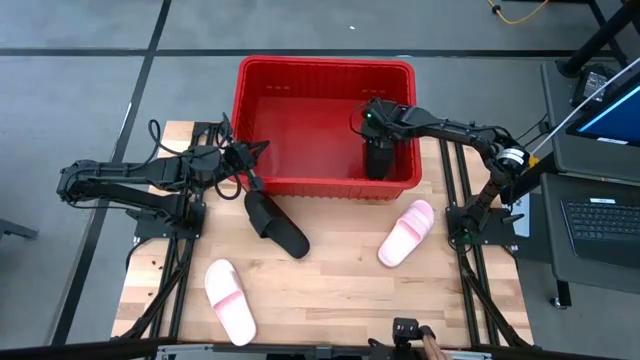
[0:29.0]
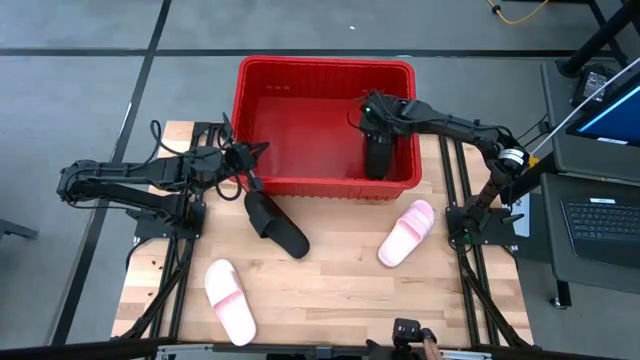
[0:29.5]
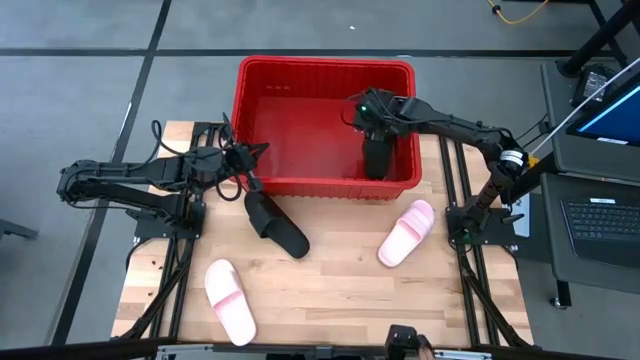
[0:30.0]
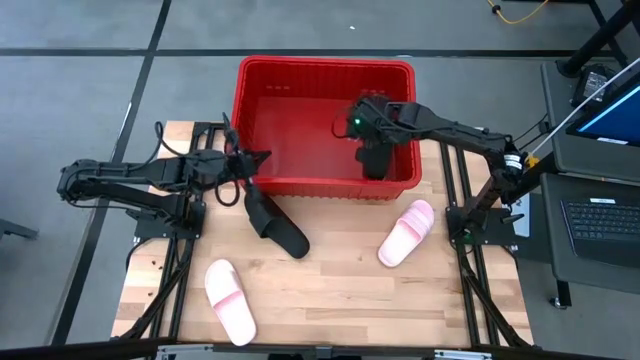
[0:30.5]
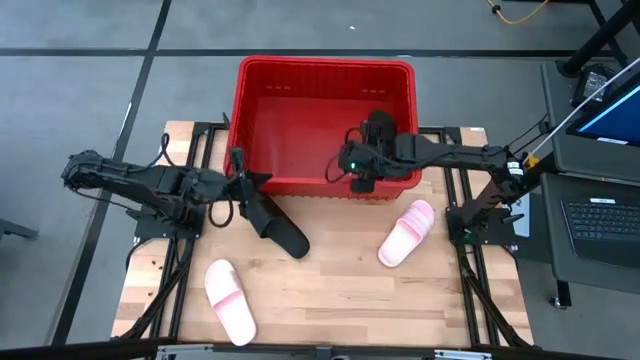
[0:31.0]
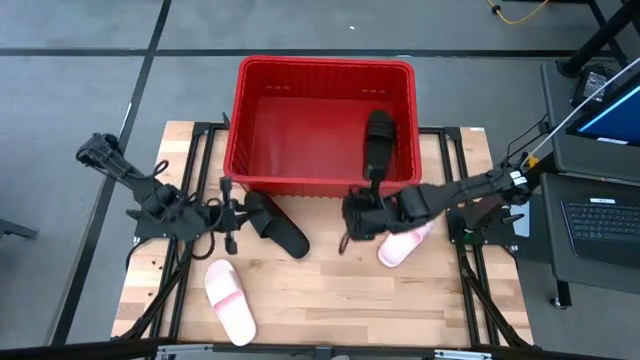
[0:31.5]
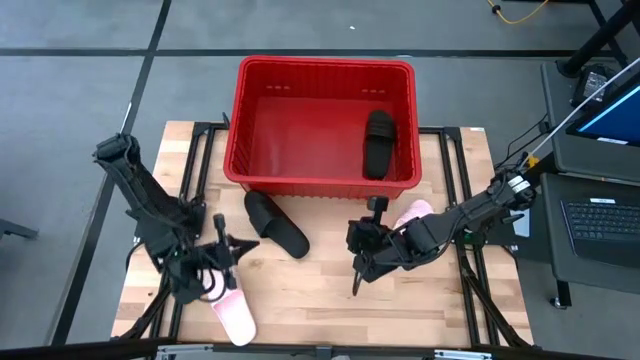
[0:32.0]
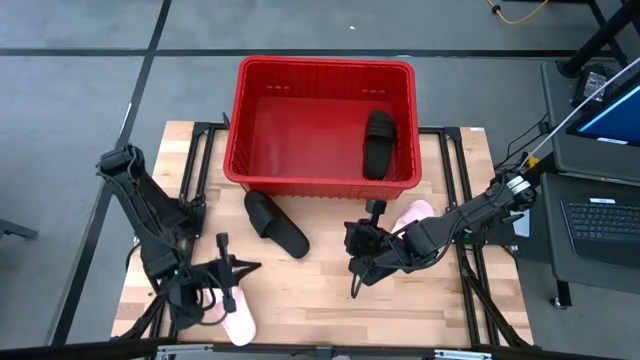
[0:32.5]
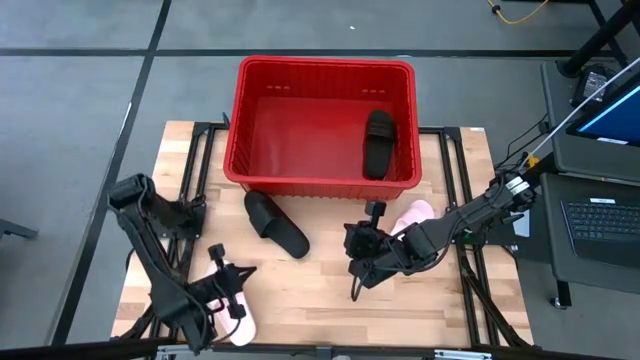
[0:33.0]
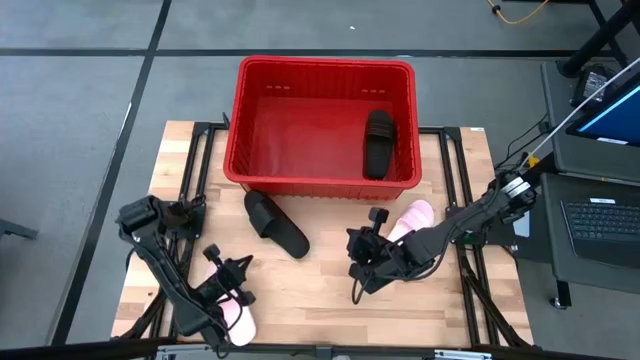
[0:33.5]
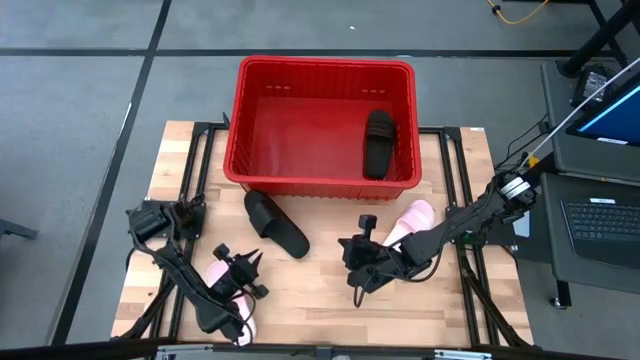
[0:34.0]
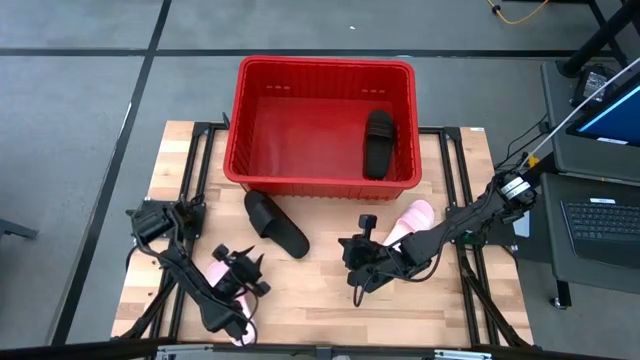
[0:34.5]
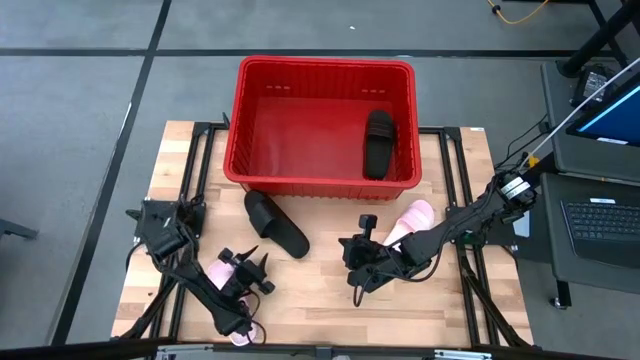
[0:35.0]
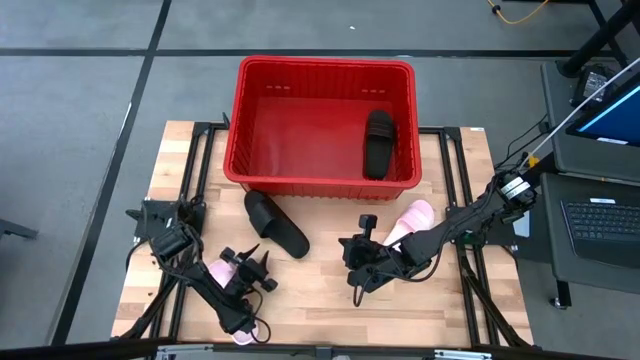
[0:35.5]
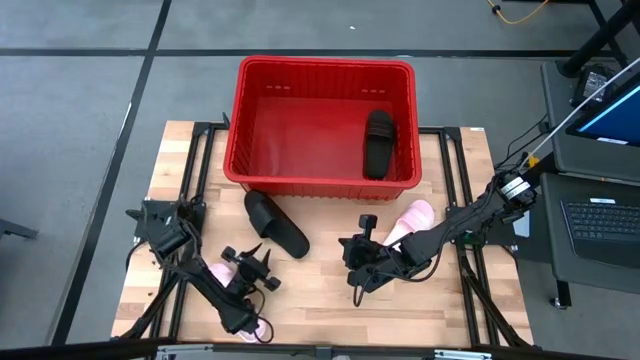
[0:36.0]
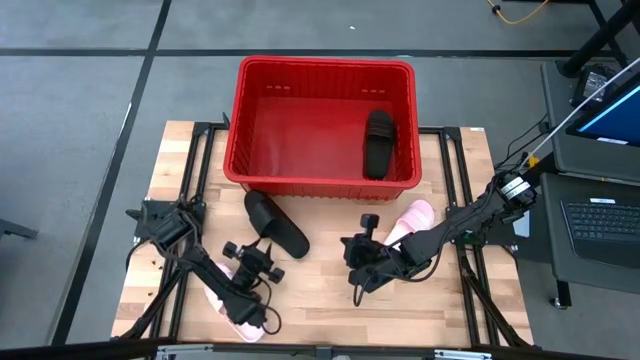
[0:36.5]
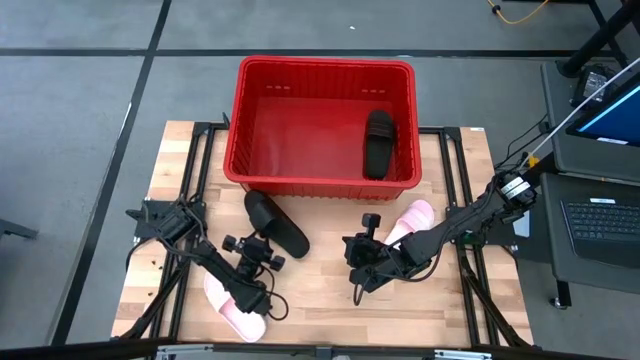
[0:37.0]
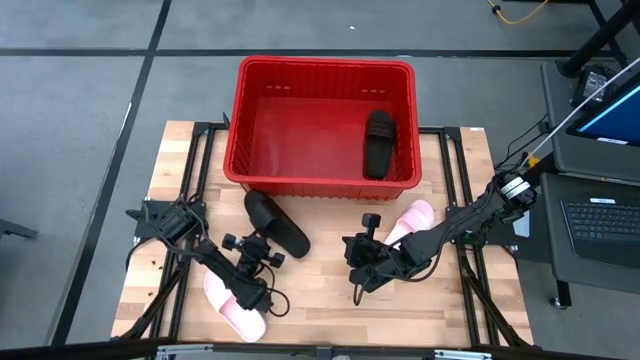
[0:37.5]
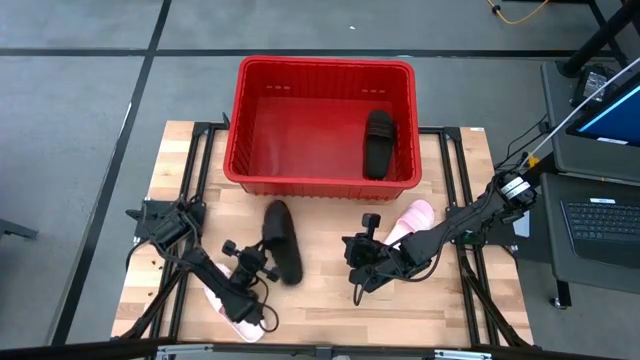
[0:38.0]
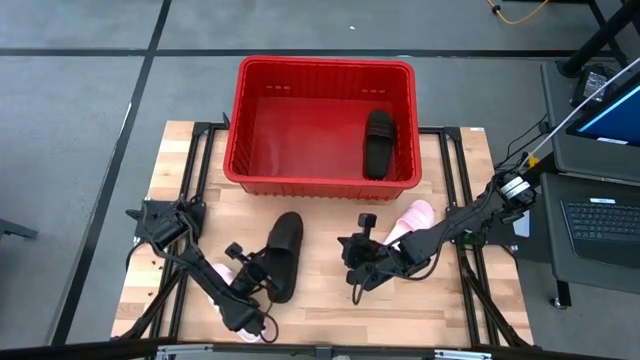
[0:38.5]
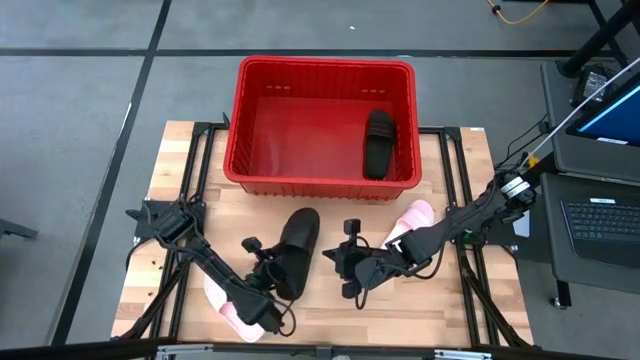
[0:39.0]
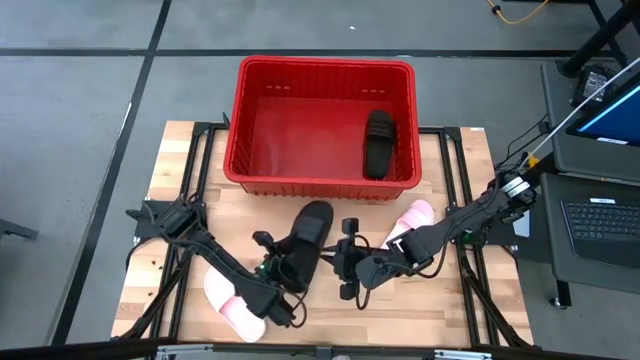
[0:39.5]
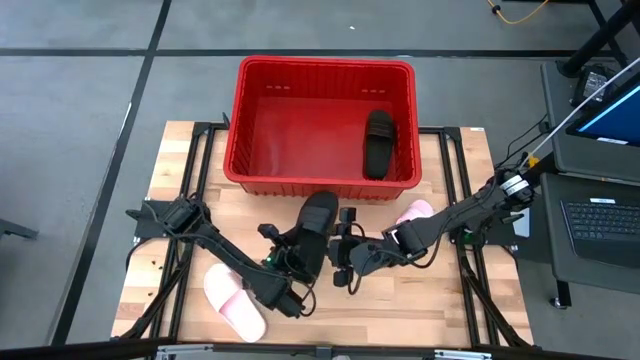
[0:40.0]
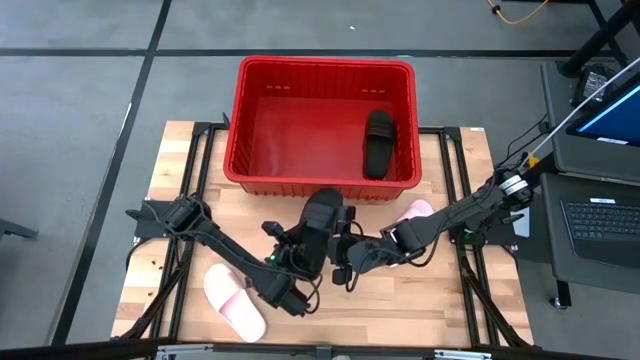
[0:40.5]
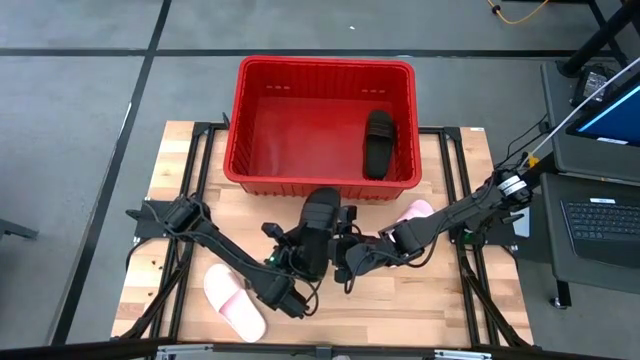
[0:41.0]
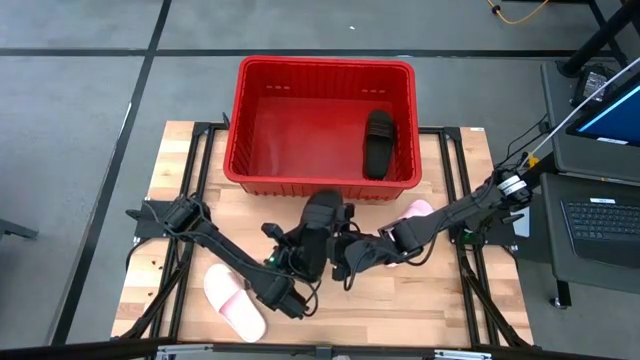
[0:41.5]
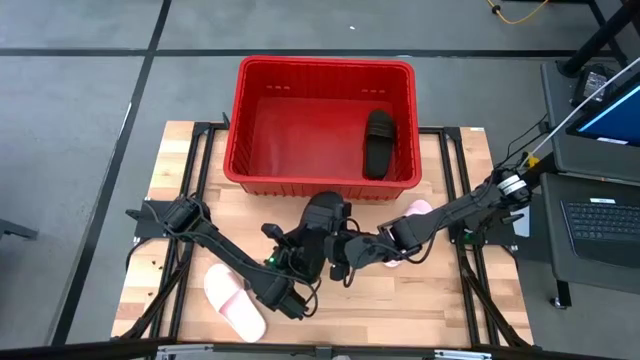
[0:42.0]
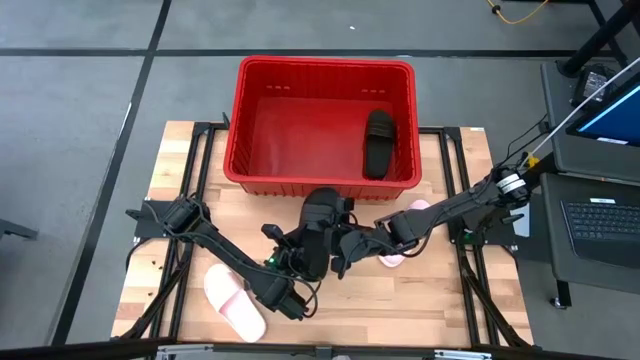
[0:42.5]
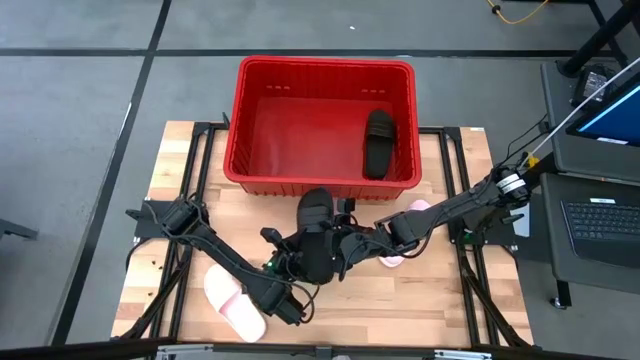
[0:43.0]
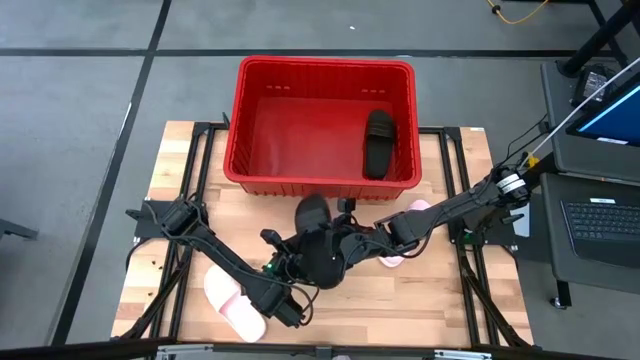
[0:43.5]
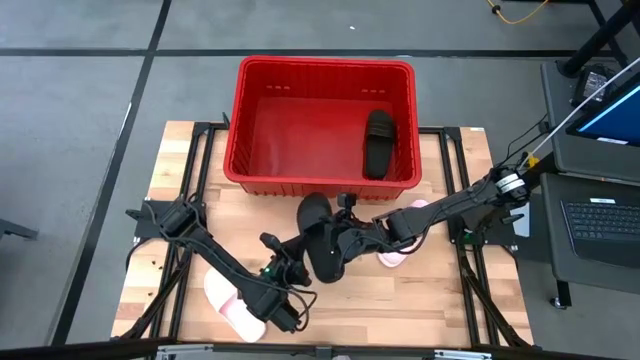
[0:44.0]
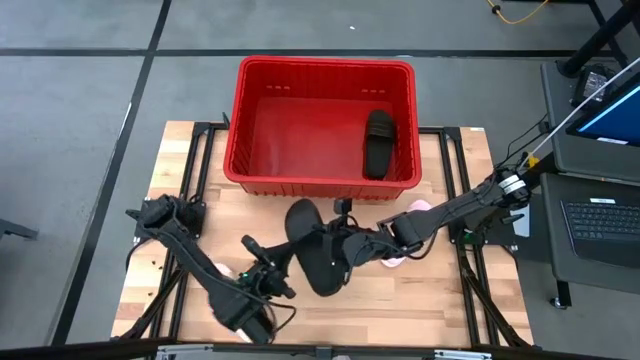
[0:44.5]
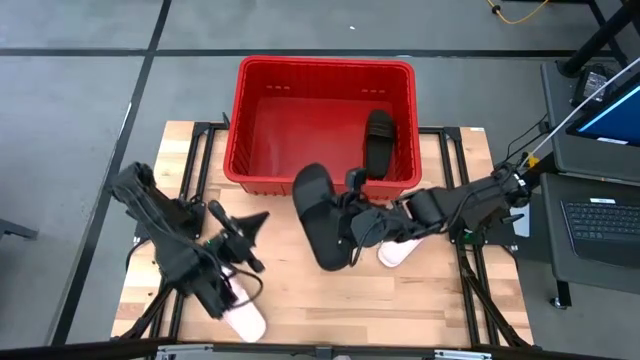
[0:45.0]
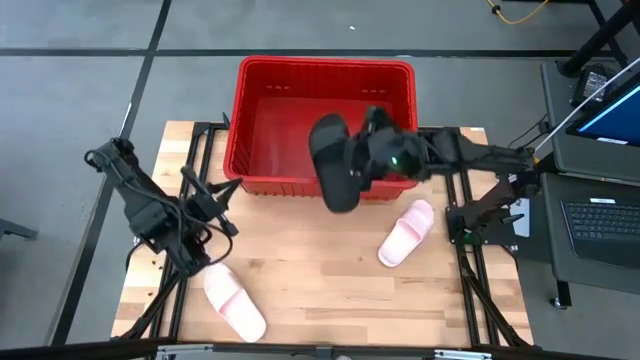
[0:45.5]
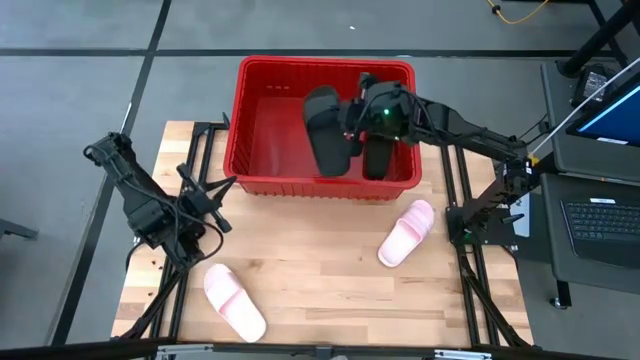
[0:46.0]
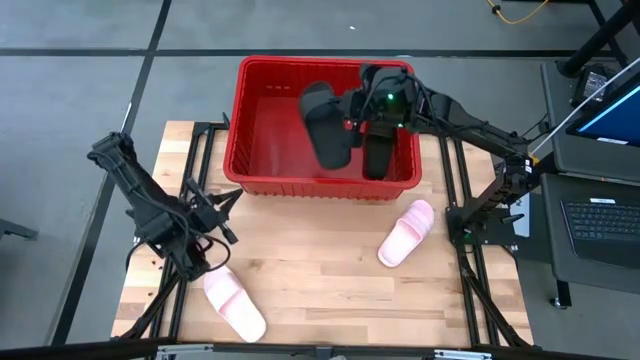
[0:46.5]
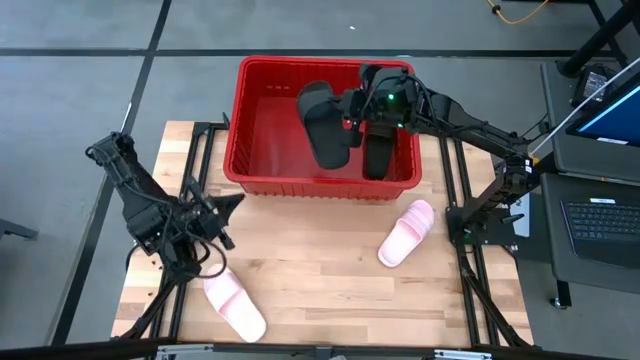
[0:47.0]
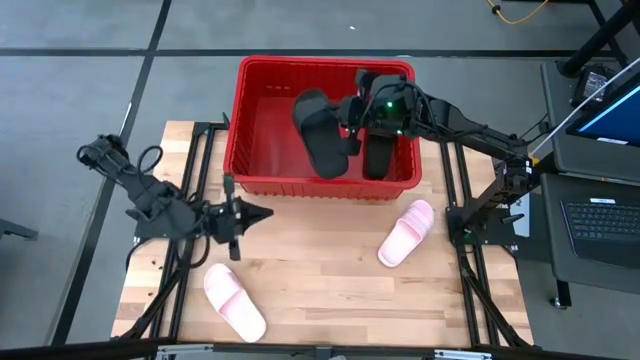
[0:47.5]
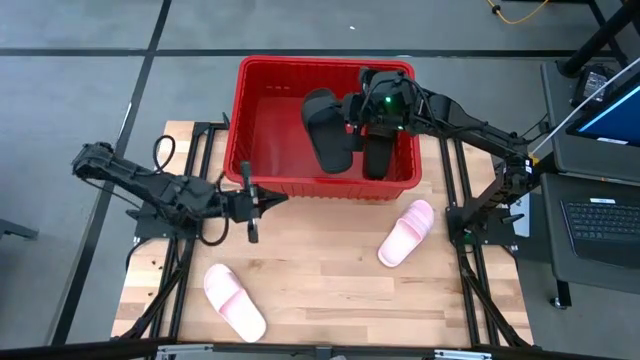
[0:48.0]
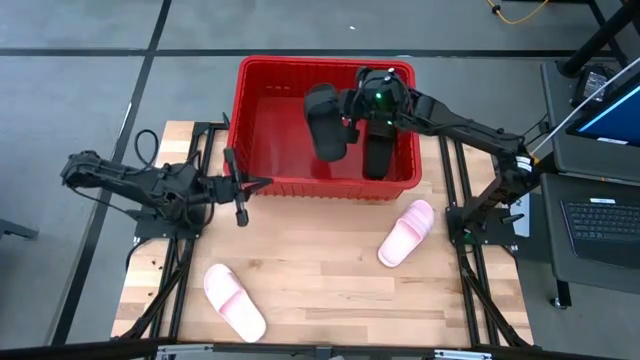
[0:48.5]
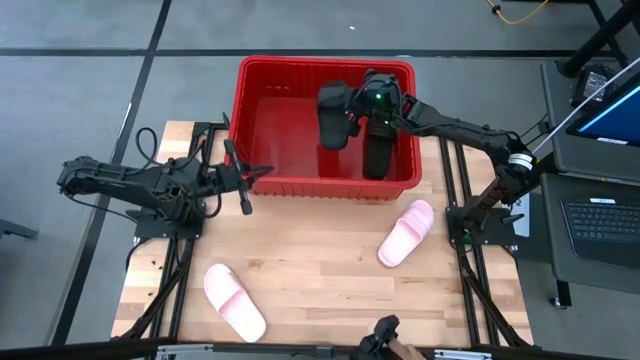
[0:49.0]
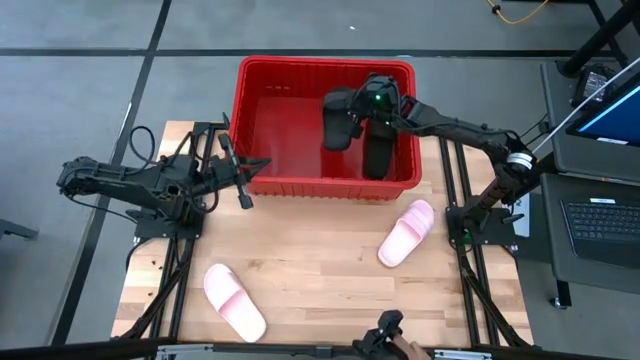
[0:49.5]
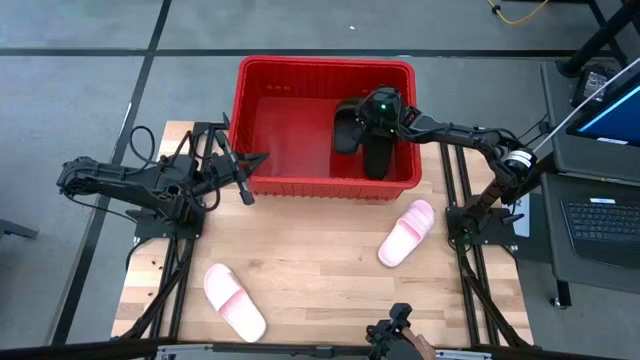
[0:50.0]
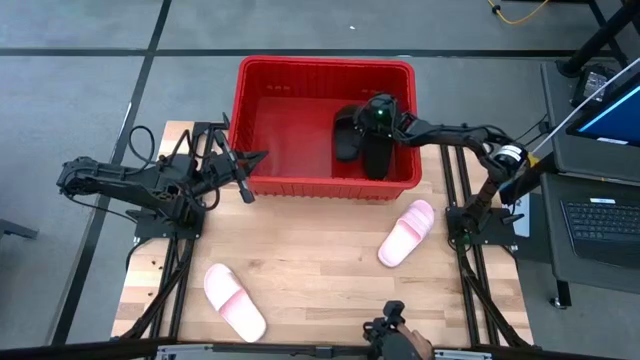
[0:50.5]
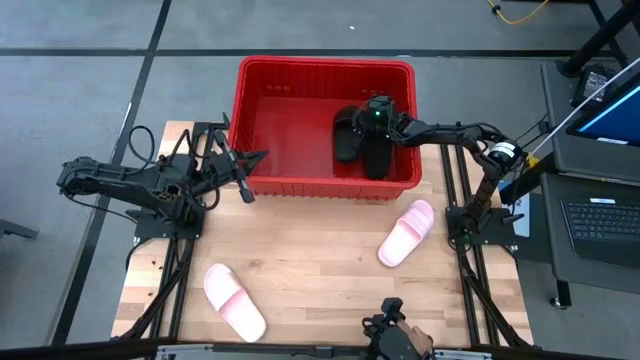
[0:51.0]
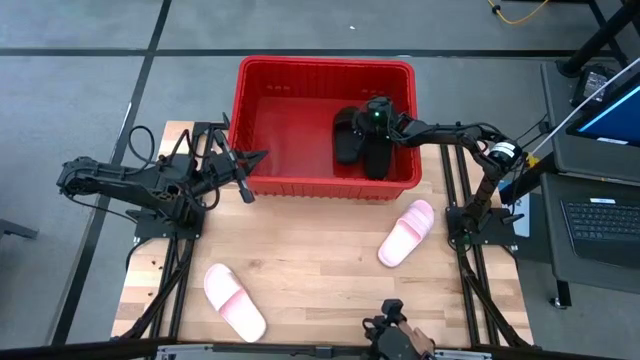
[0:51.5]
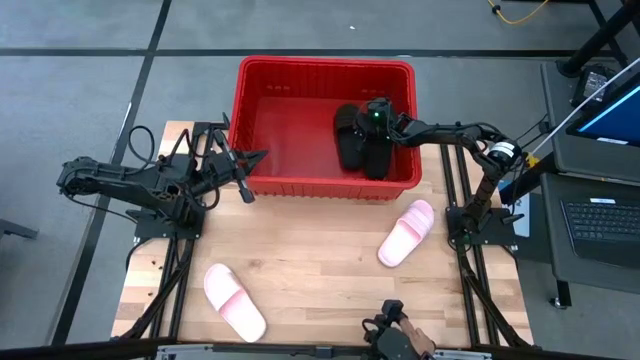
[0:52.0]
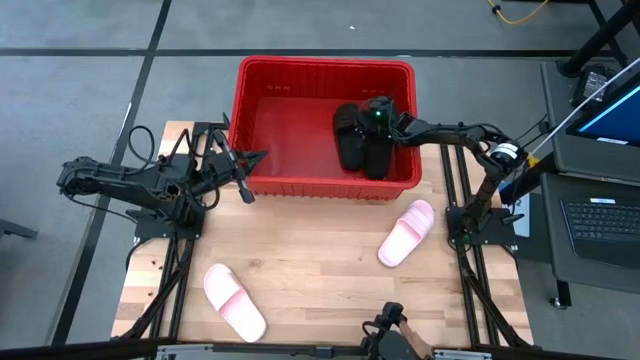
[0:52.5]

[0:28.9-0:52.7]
Task: Pick and place slides into bin
Put the black slide into the red bin
